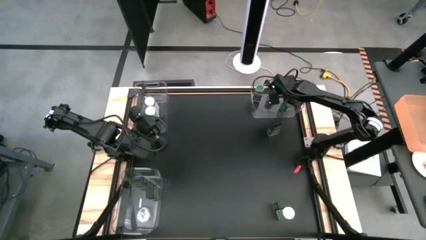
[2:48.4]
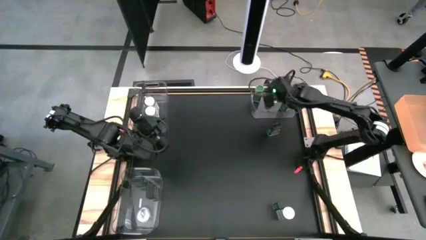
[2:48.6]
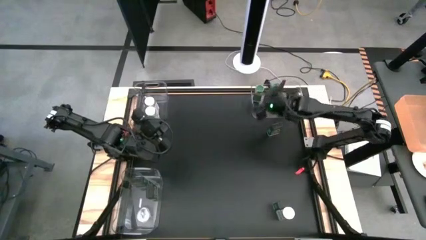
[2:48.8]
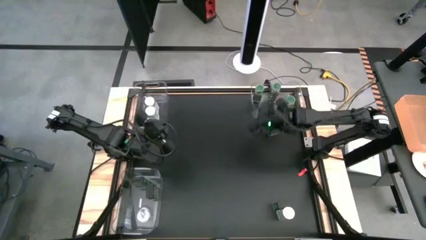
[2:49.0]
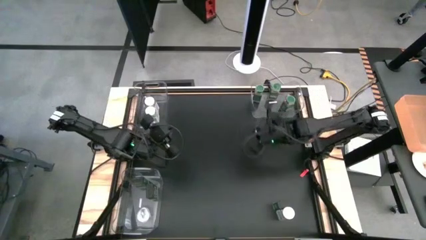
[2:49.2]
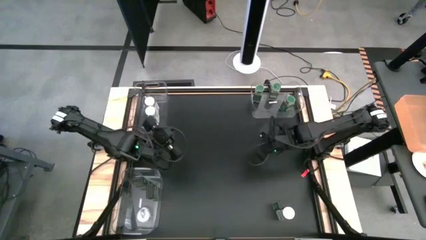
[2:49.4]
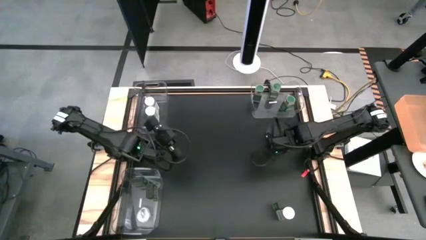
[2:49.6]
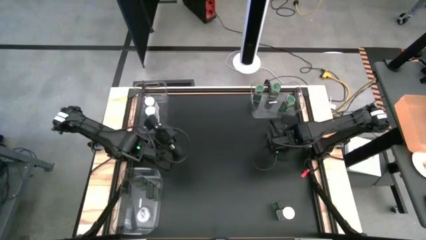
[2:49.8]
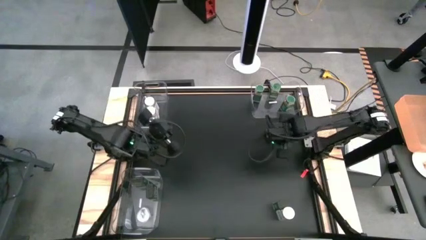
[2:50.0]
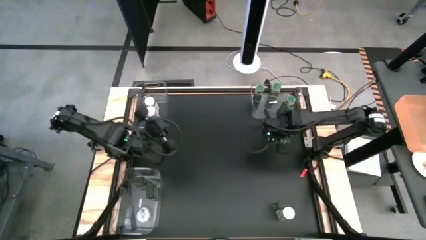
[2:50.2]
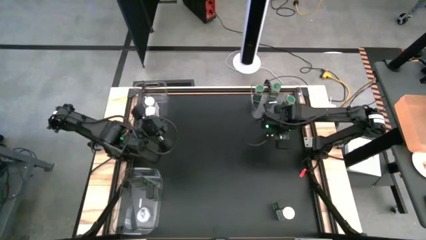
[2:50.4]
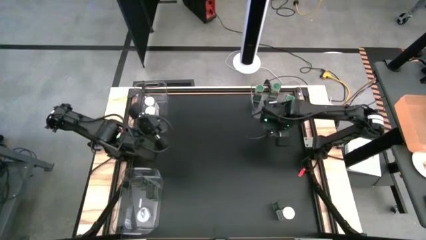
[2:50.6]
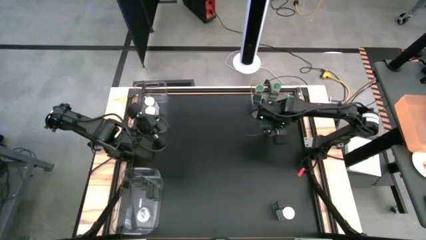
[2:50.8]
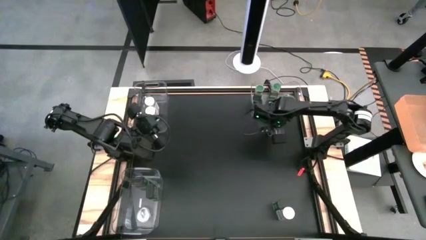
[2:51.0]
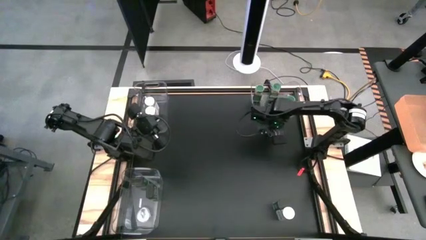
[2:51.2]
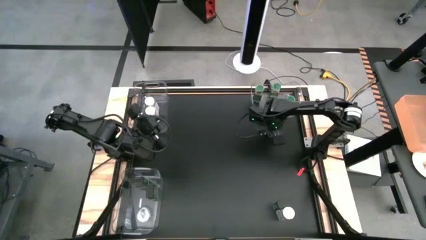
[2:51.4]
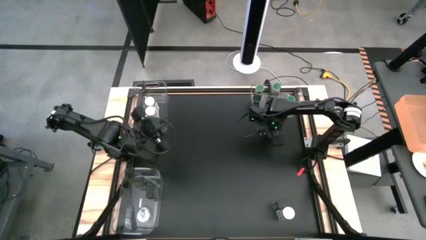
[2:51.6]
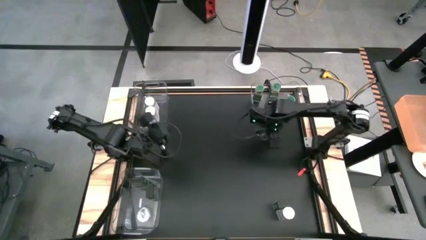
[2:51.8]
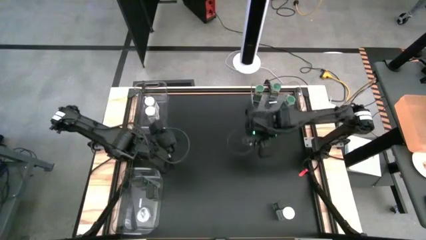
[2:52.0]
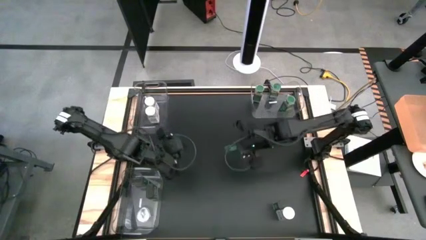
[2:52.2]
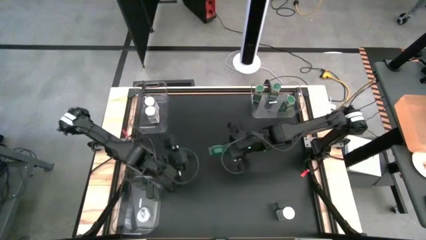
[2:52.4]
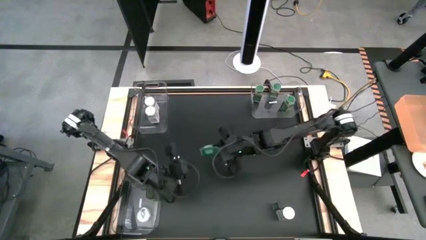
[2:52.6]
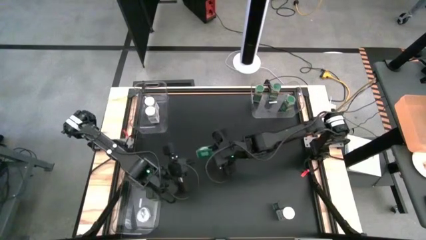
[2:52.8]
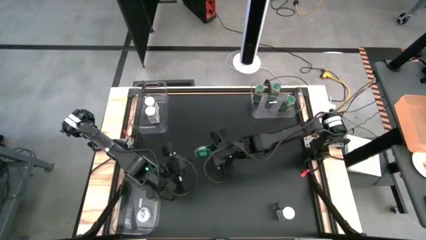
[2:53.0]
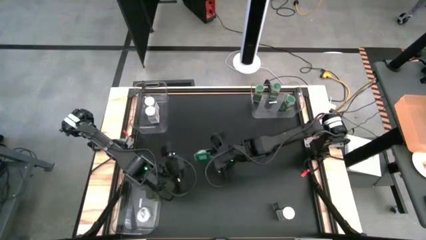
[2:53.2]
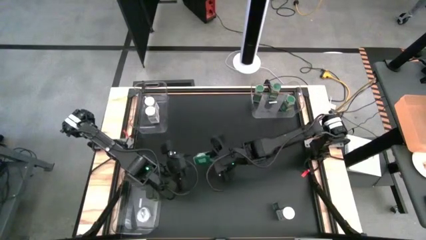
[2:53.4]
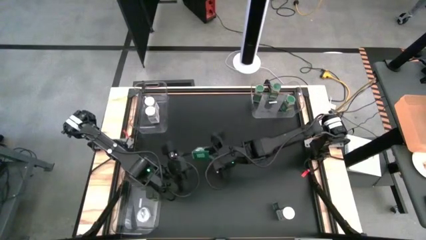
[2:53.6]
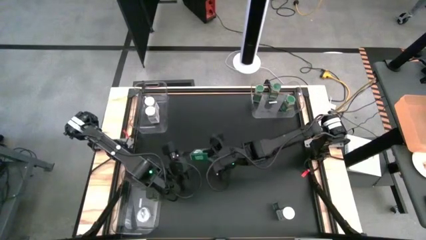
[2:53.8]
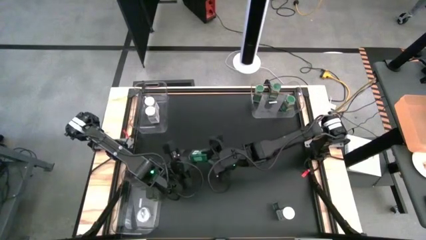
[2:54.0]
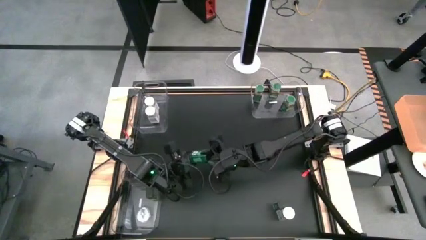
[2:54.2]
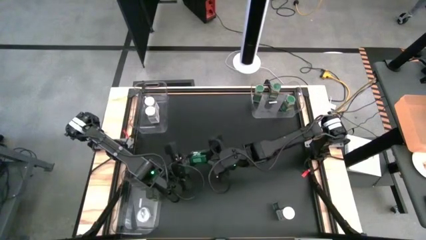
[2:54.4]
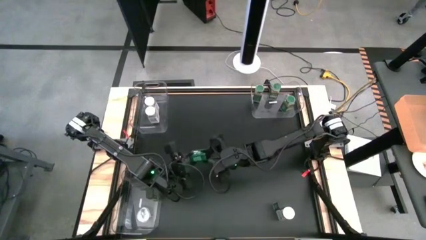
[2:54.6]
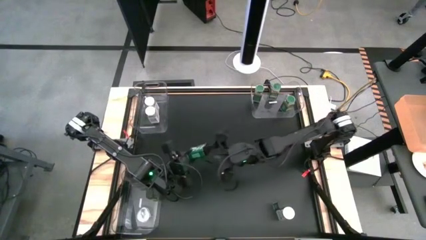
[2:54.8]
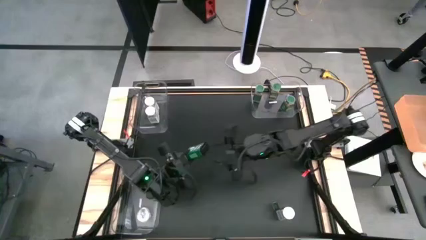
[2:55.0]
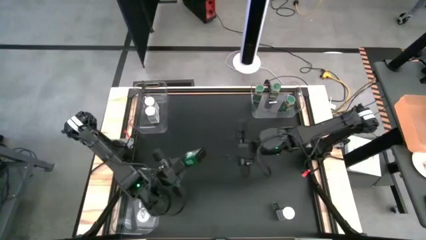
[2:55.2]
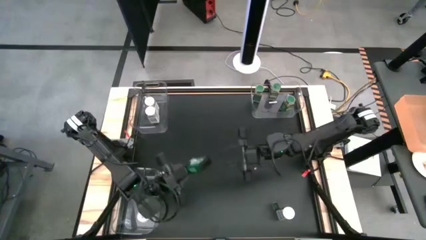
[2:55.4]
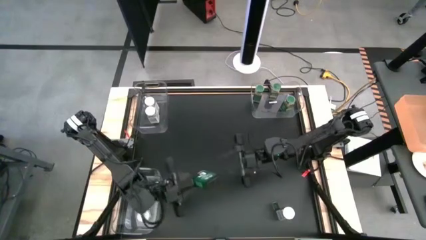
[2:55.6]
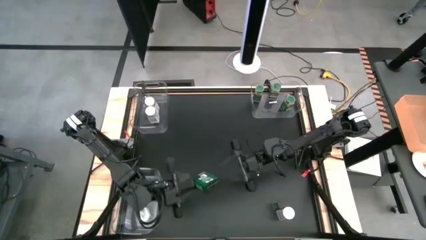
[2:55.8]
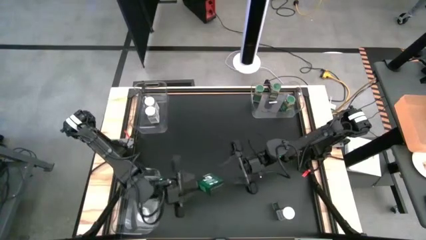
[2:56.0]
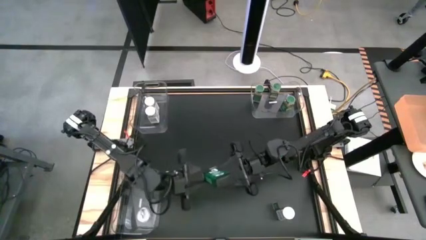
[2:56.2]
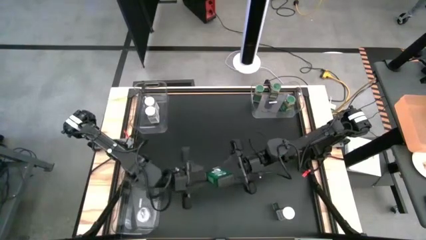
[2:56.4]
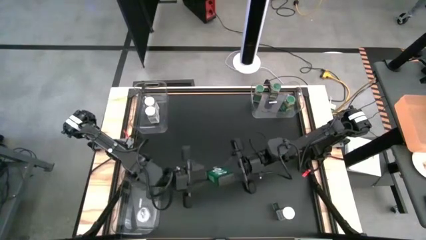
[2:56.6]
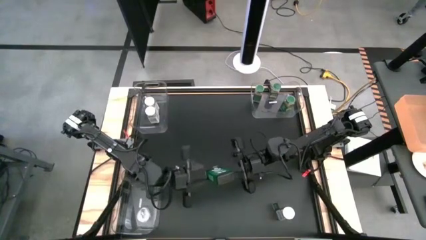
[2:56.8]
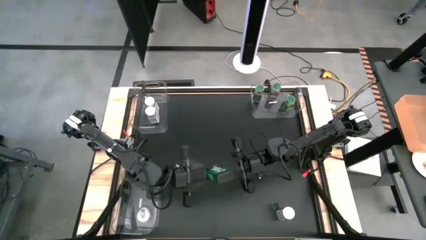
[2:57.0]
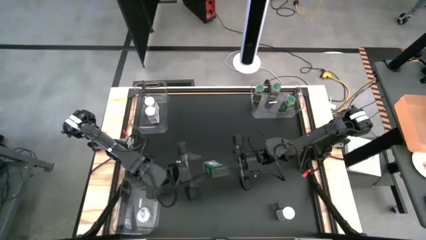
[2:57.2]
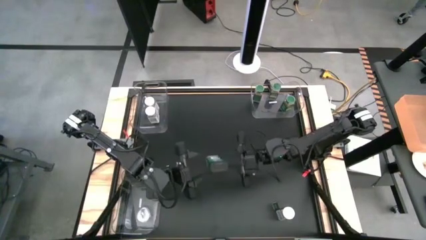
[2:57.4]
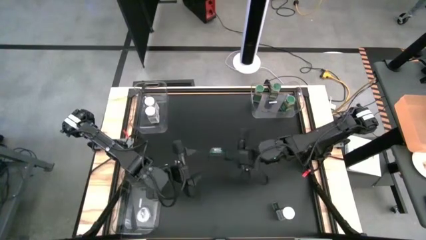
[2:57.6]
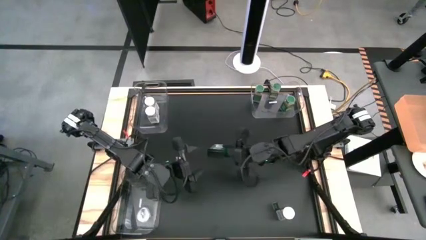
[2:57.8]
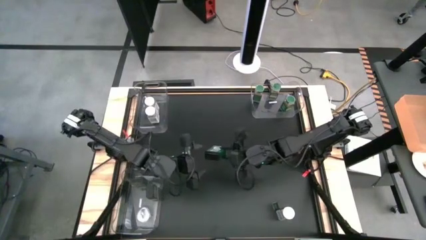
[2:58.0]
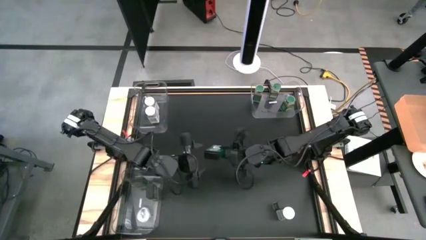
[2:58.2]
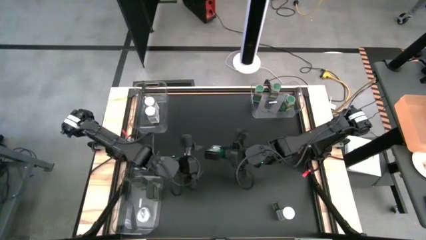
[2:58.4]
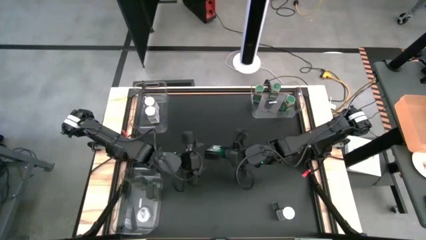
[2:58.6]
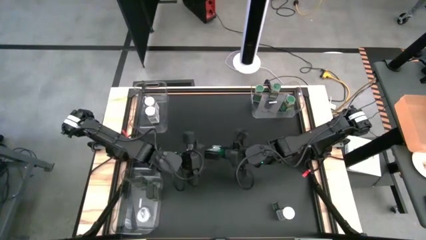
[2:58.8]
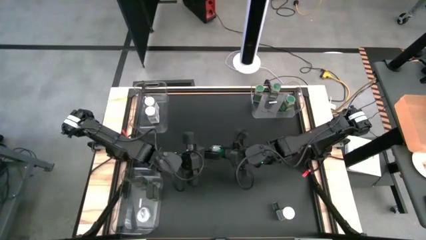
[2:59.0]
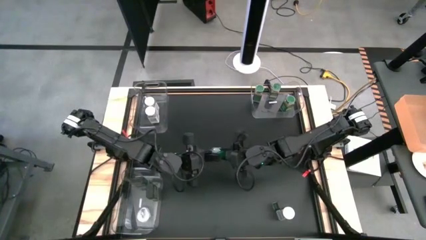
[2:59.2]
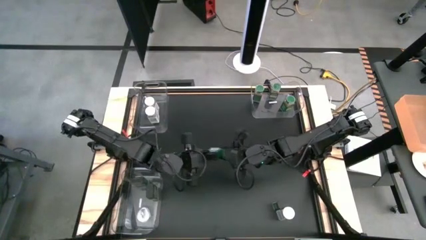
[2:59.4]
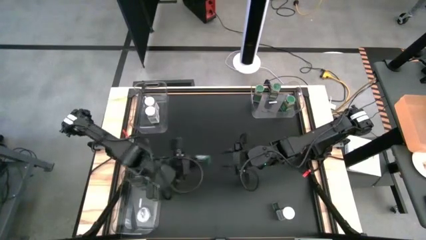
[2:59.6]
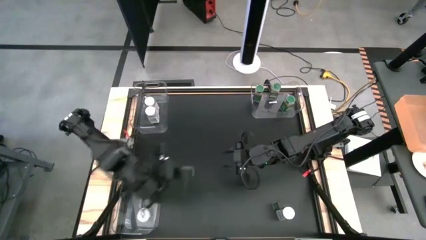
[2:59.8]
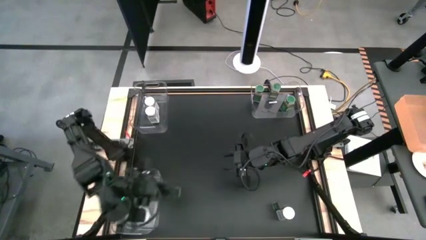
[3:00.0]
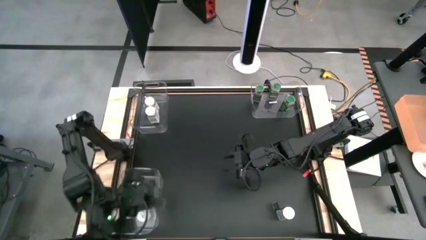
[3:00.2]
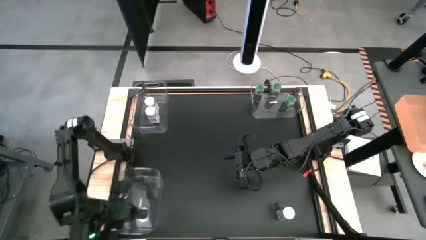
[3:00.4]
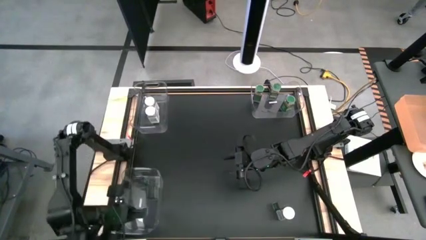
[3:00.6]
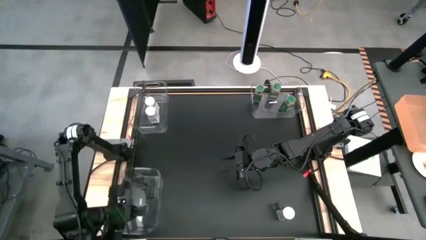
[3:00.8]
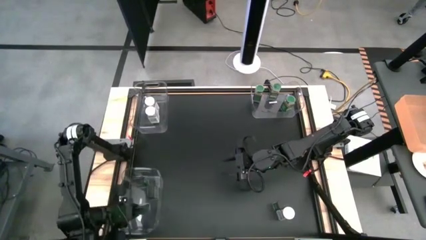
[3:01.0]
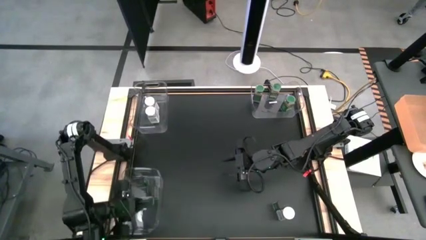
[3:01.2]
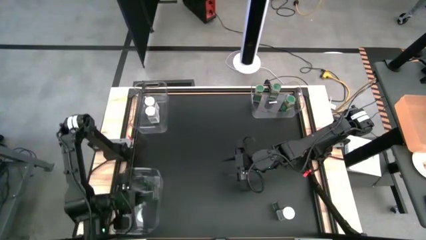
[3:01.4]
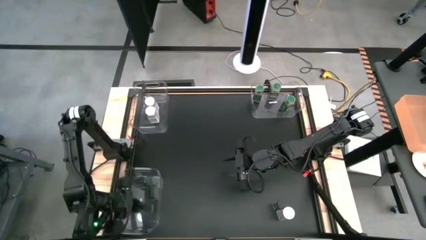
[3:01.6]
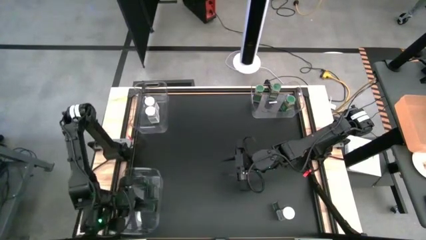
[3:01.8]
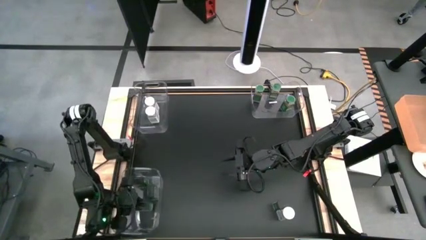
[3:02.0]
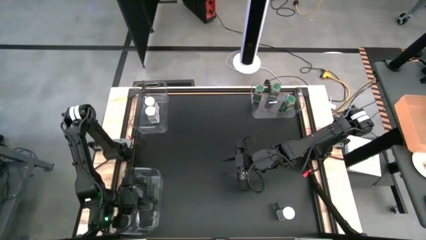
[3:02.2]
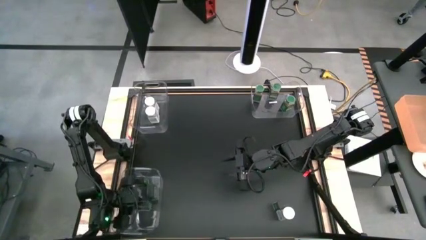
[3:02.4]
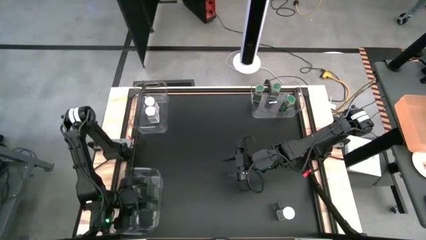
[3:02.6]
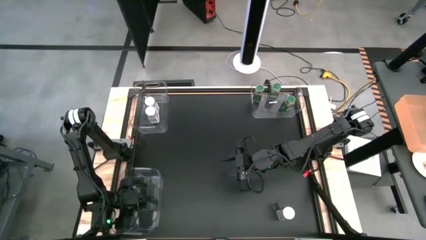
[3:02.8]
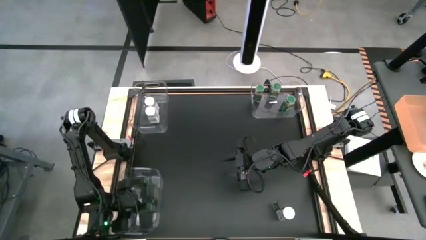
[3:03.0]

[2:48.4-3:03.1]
Task: Sort spices by type
Put the top black seasoning can into the bottom left transparent bin

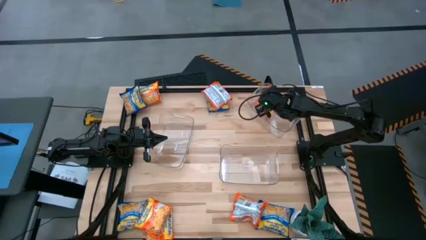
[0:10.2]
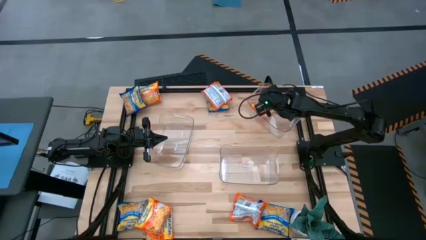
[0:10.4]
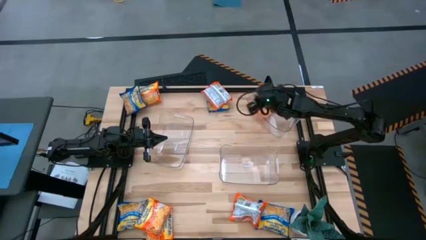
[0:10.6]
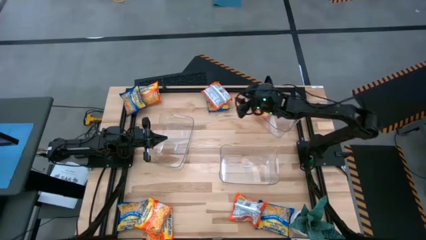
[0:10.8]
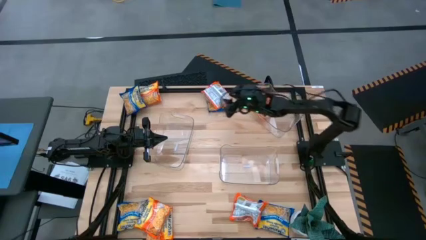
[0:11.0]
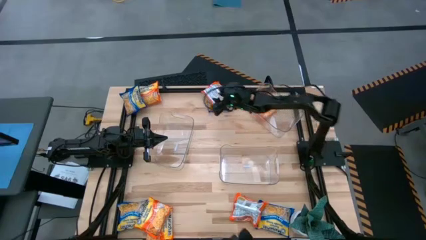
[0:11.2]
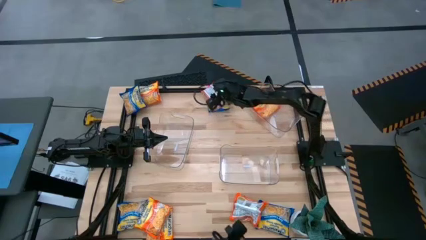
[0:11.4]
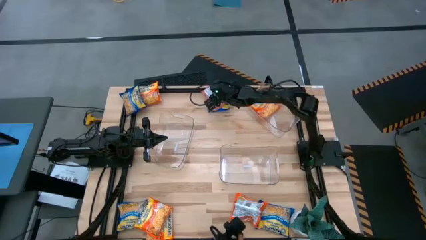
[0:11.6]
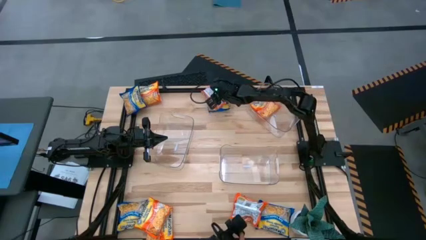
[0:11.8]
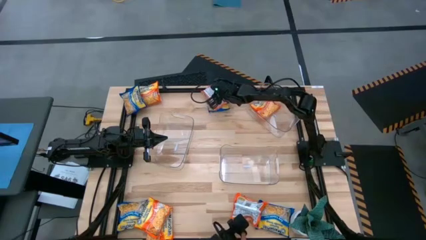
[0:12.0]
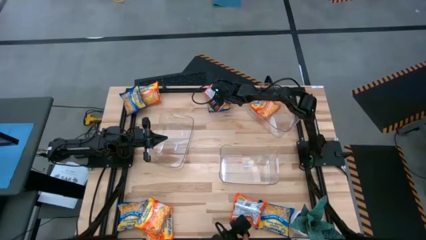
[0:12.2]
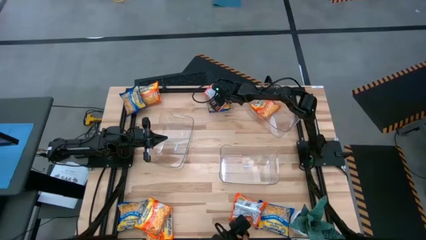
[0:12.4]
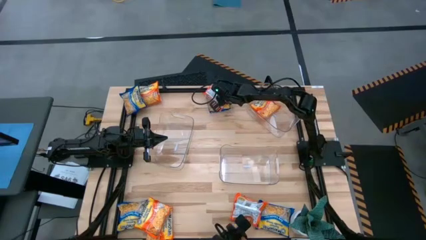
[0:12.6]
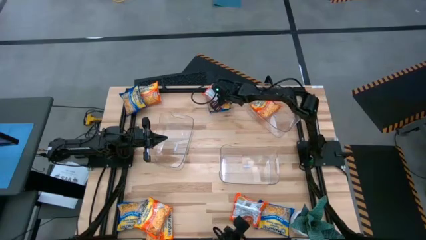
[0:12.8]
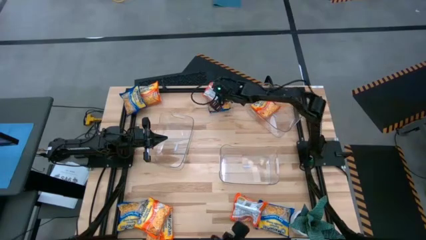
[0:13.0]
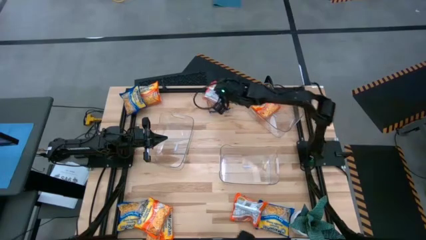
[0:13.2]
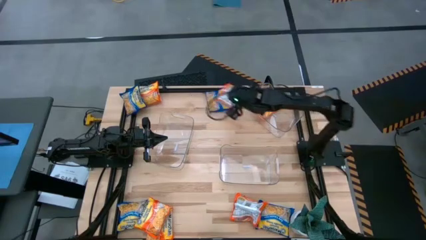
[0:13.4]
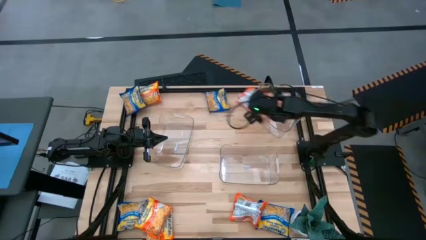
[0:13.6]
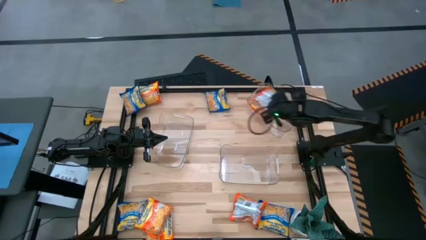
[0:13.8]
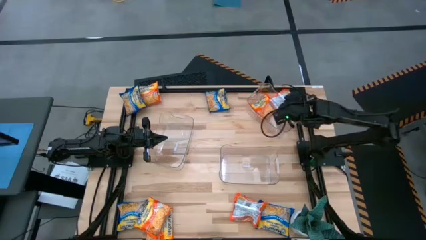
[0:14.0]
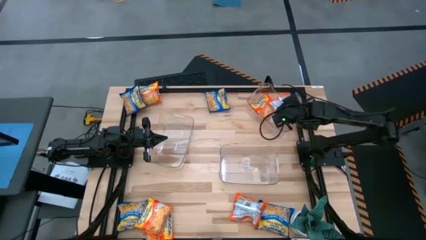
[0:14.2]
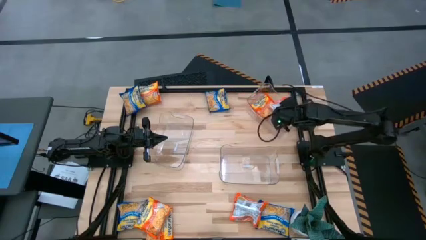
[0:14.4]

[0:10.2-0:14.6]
Task: Sort Maruchan noodles
Put the orange noodle pack into the top transparent bin
